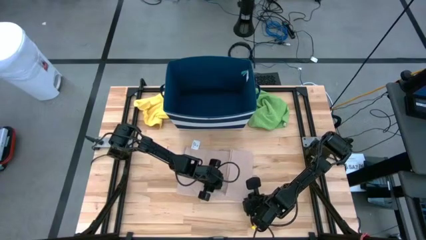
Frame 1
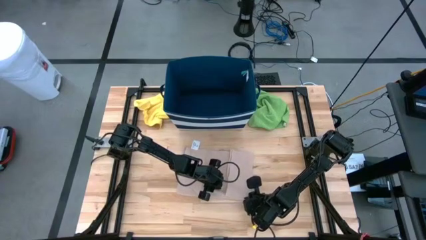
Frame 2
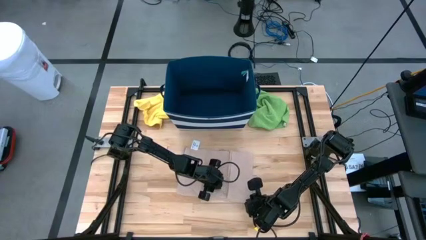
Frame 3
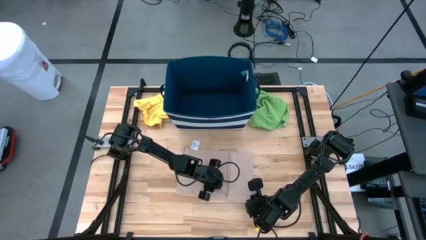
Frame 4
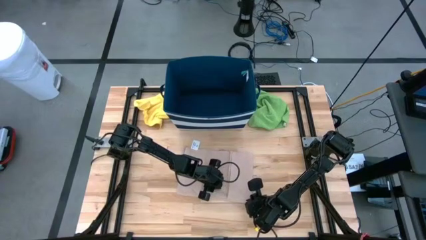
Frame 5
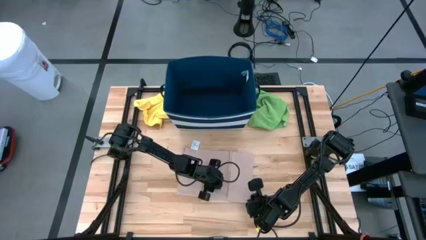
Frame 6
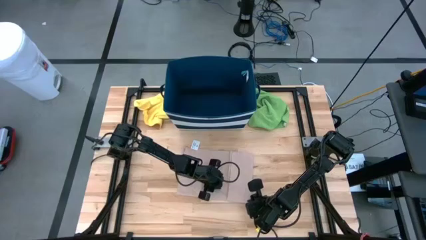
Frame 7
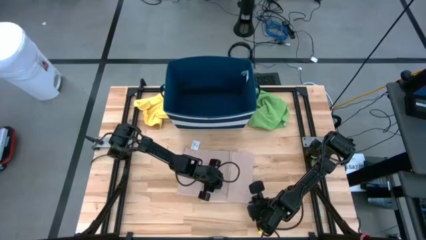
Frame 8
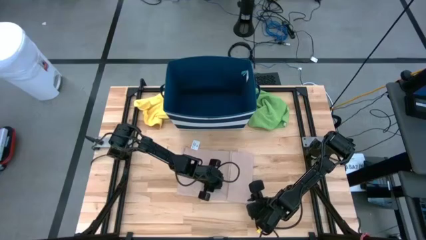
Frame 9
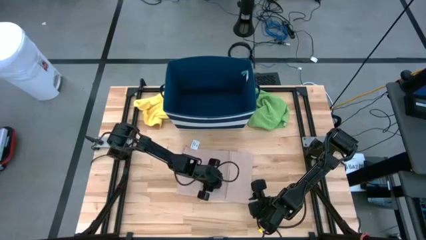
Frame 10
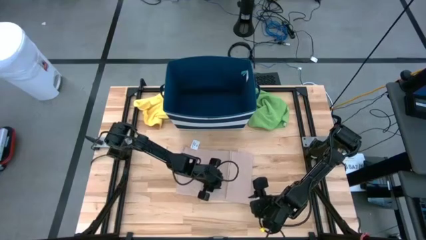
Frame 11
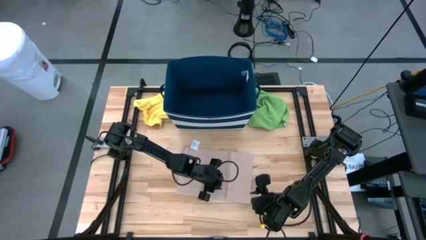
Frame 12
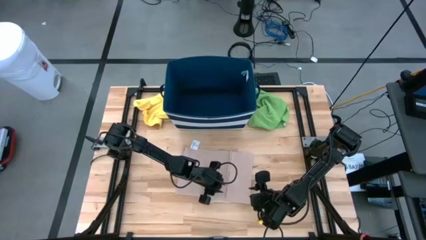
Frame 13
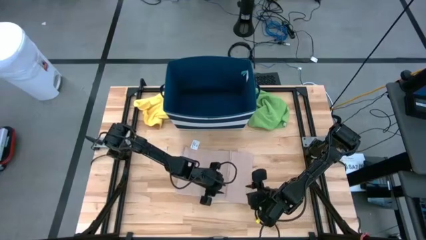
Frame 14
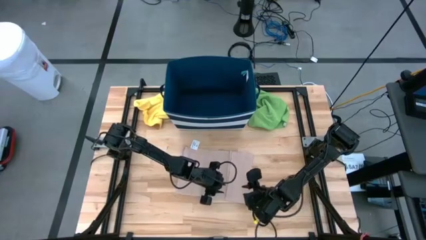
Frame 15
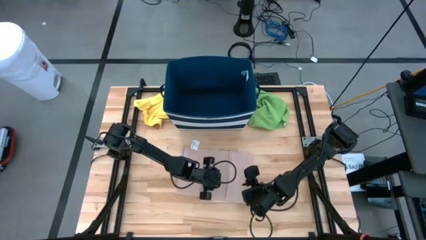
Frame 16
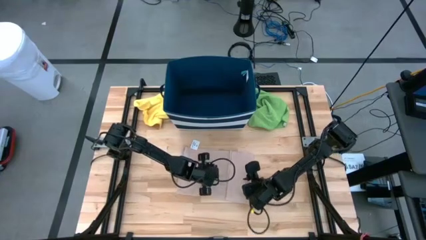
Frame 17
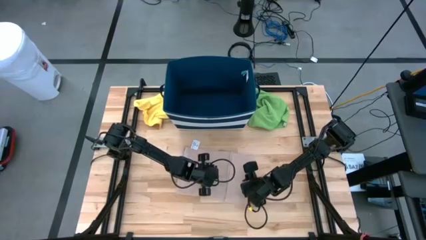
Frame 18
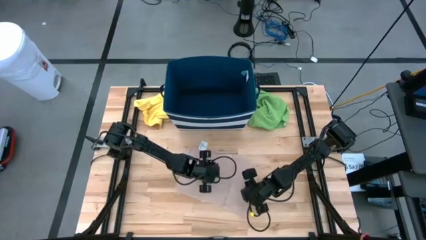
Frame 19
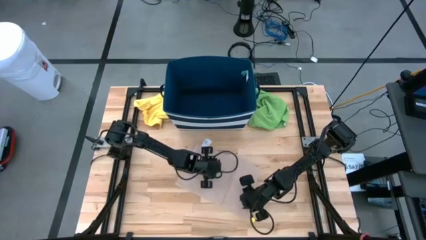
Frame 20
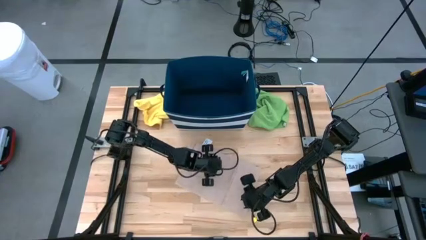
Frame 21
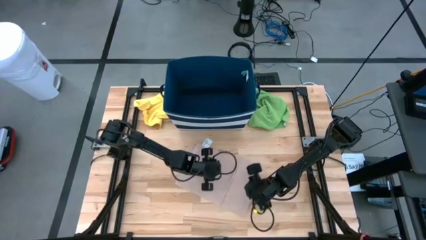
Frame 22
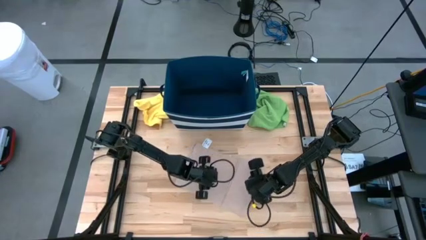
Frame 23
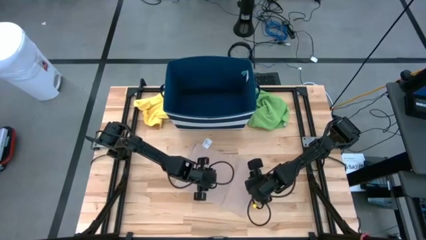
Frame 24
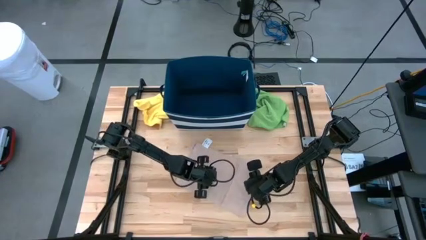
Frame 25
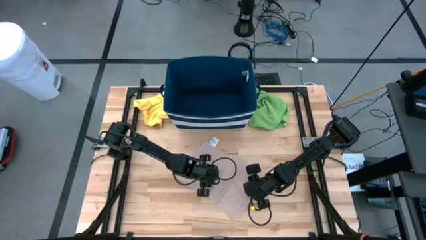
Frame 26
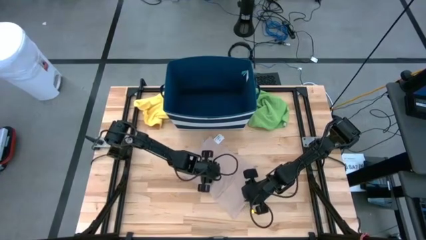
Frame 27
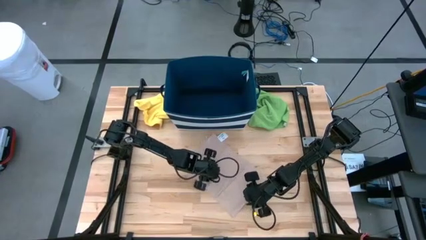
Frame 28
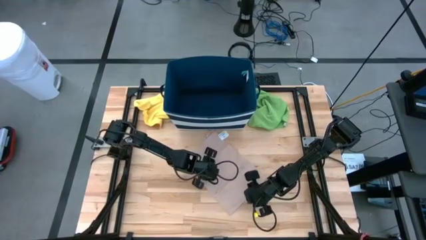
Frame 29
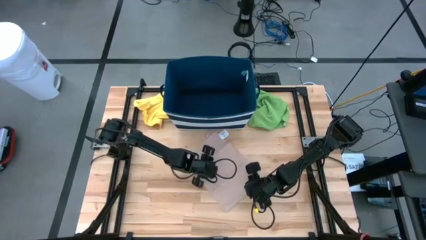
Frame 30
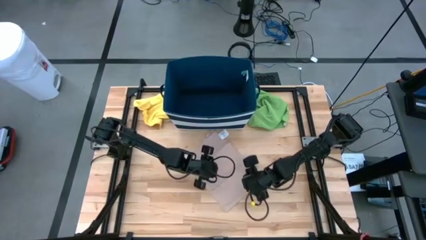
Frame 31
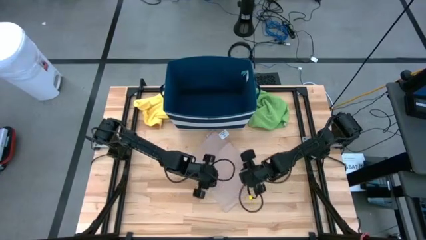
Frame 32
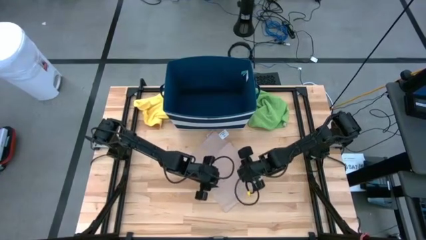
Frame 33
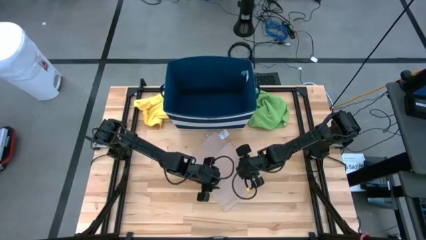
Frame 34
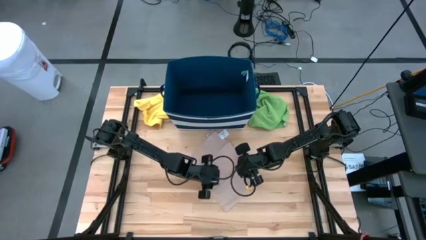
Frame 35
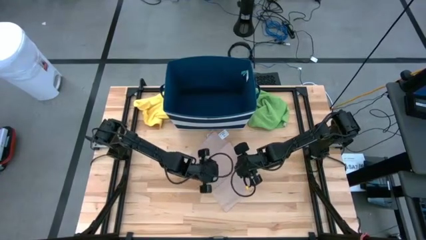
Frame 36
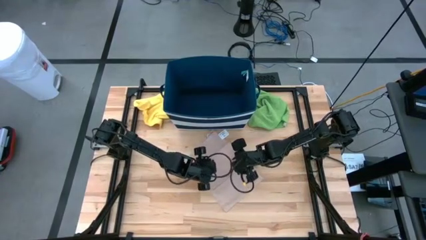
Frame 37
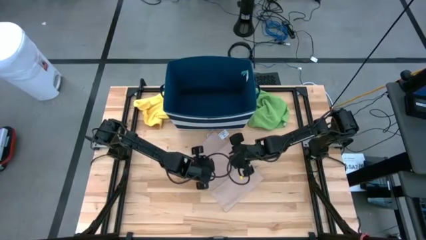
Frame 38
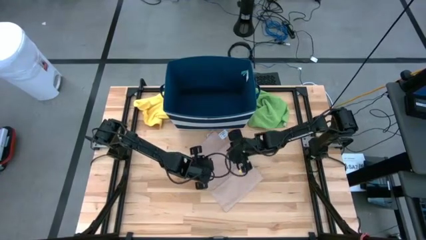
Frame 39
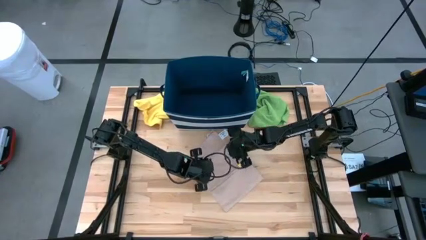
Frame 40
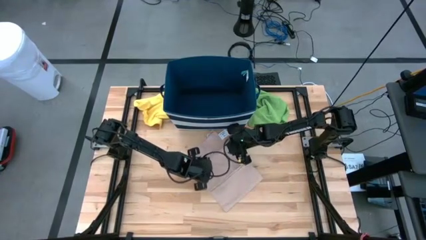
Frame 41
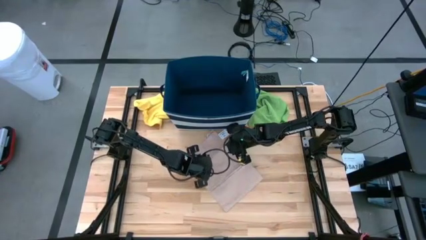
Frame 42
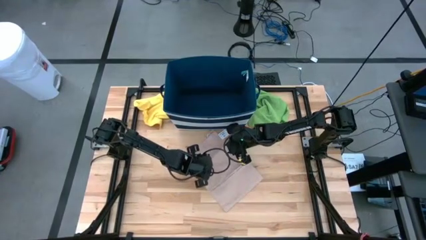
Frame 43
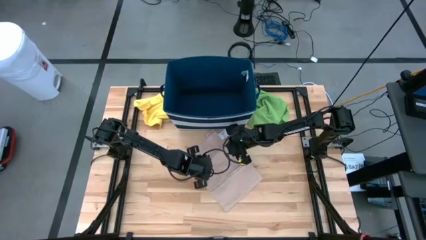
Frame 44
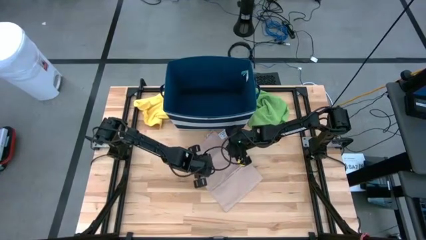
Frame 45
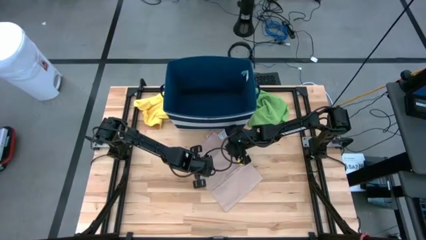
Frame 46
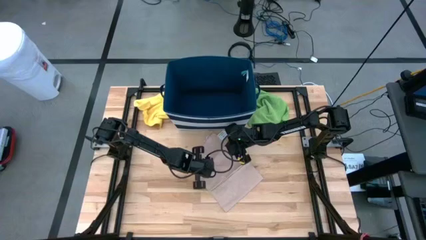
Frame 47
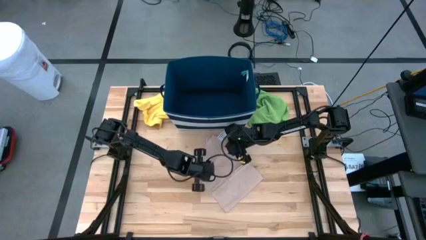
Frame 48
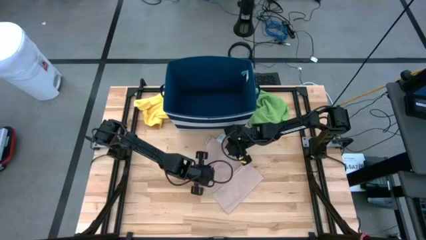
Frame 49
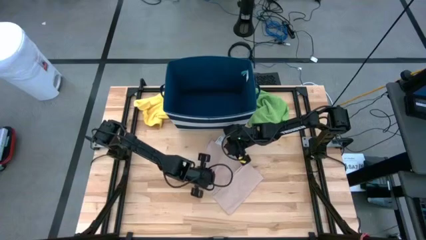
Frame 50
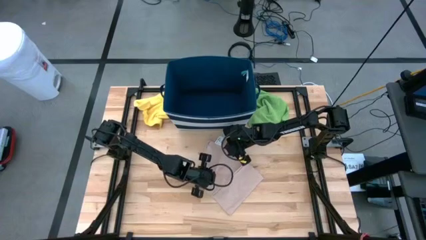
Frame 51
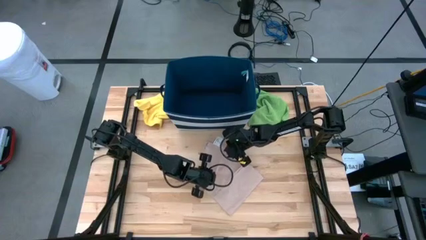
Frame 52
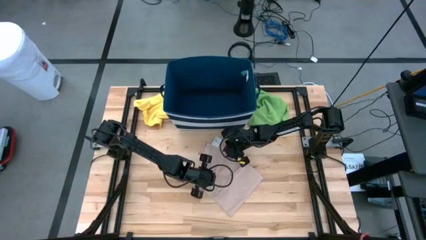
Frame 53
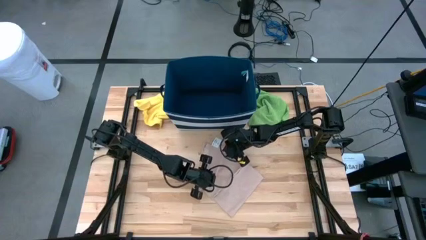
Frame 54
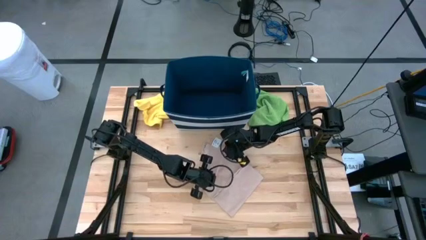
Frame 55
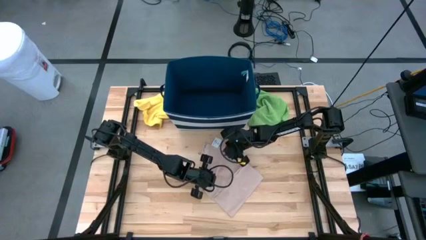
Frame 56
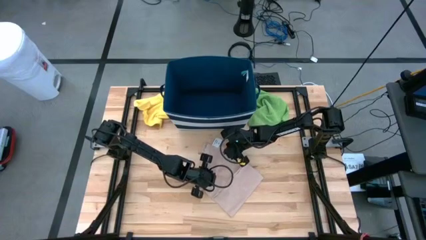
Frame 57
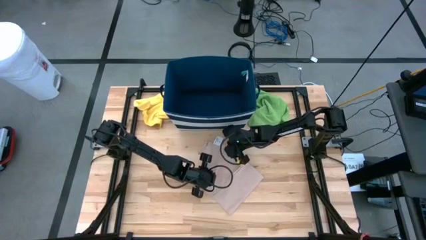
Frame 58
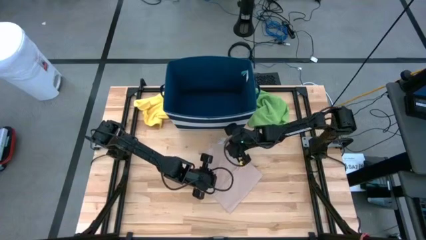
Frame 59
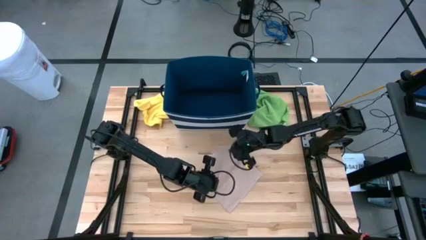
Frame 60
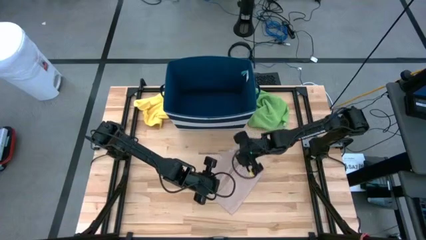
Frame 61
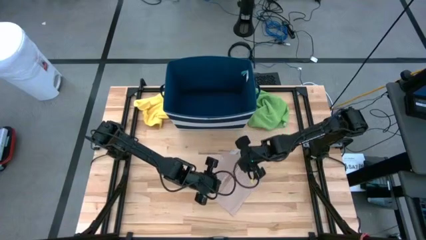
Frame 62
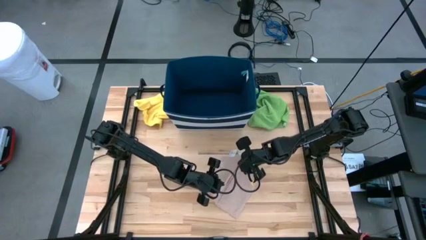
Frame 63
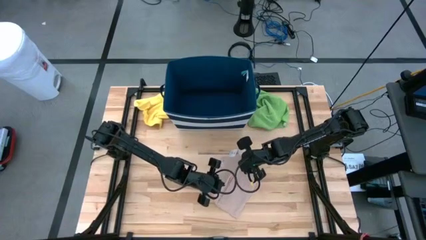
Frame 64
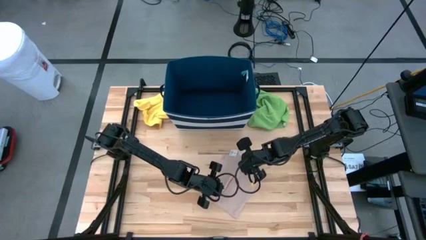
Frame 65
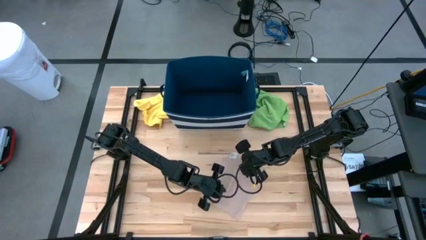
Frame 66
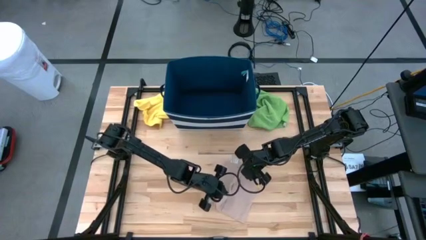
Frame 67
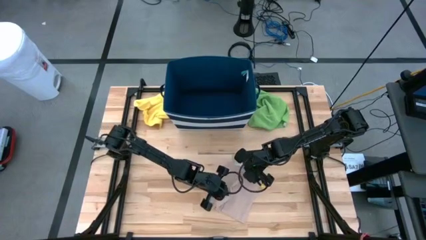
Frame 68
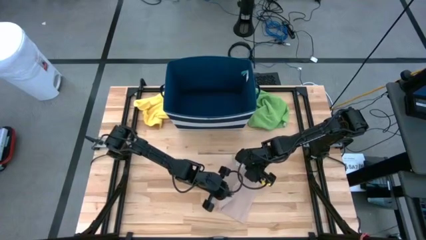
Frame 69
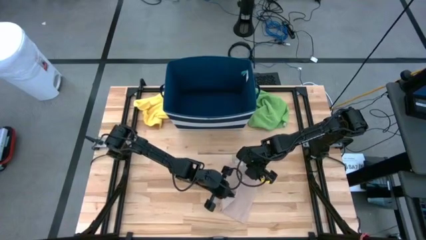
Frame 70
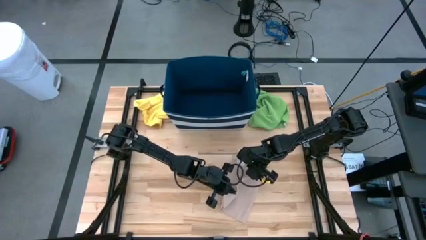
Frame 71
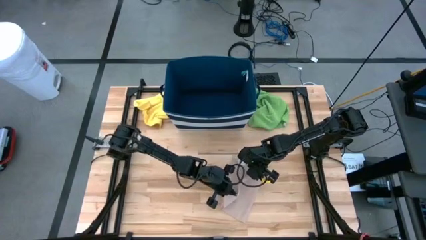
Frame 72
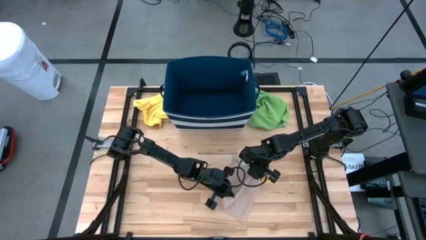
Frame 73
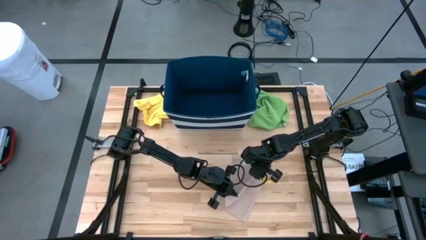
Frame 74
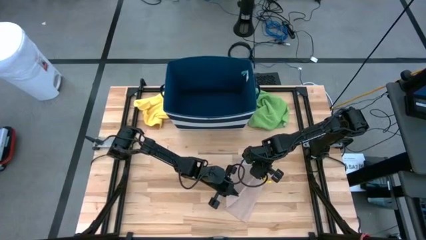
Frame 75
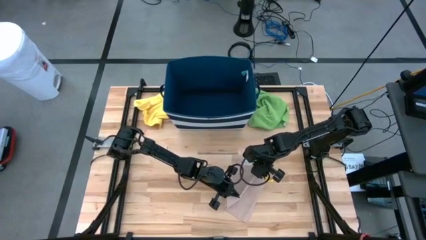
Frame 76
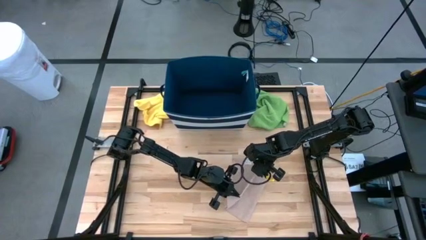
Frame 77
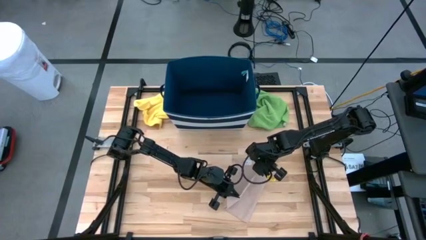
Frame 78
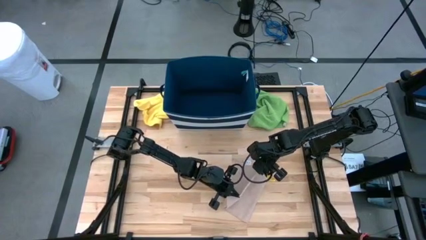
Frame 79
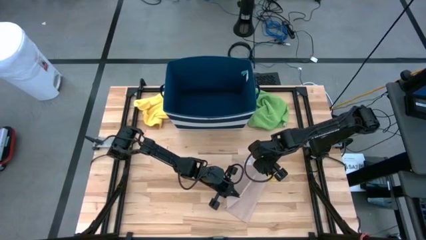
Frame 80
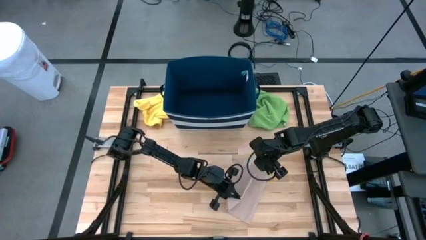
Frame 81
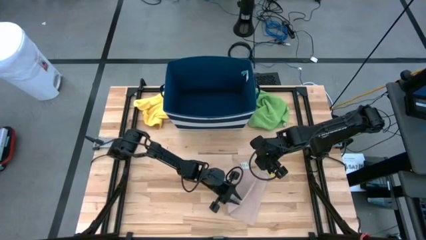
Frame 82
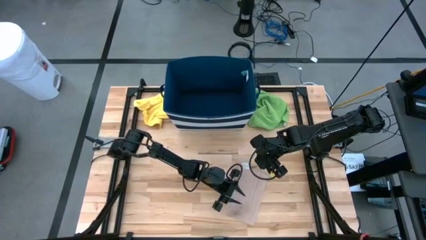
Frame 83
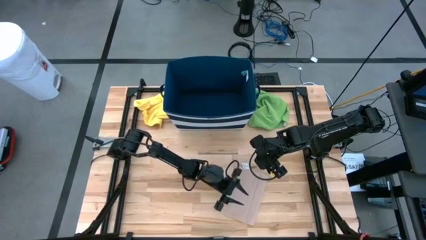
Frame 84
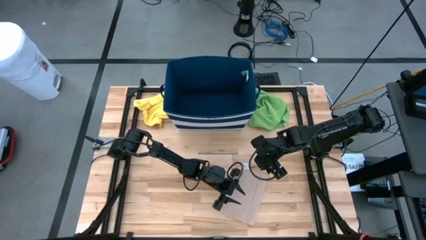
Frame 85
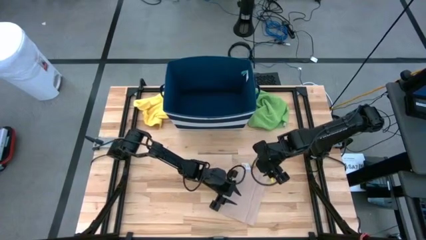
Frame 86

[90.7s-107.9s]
Task: Fold towel
Fold the brown towel
